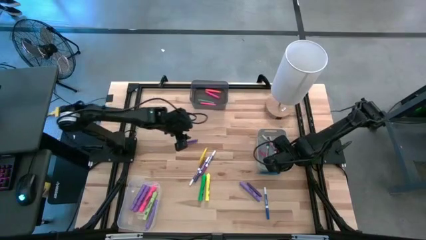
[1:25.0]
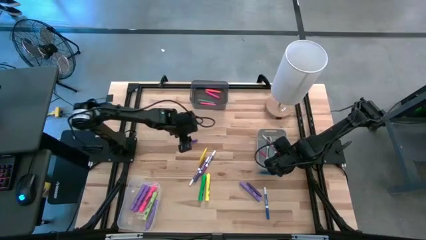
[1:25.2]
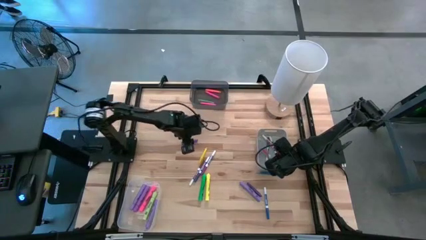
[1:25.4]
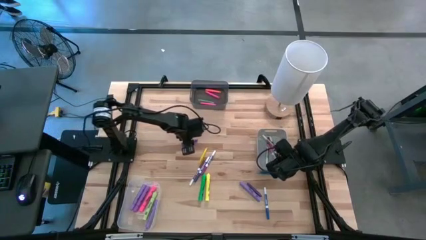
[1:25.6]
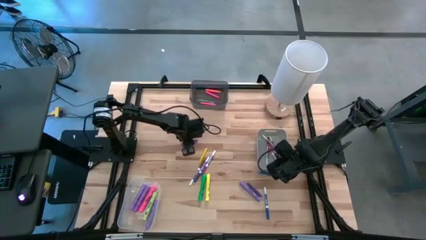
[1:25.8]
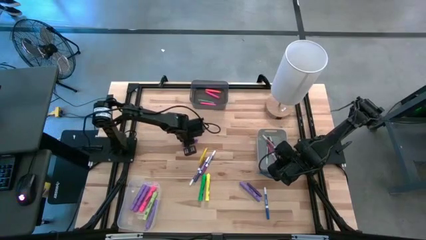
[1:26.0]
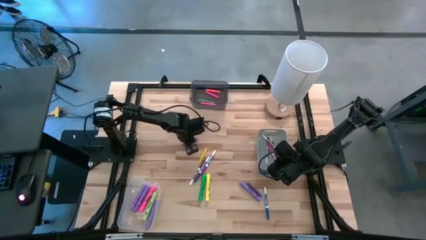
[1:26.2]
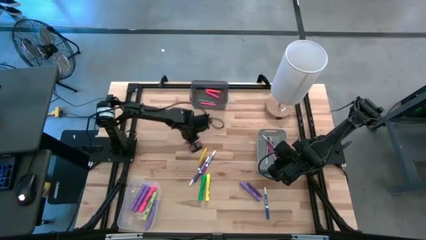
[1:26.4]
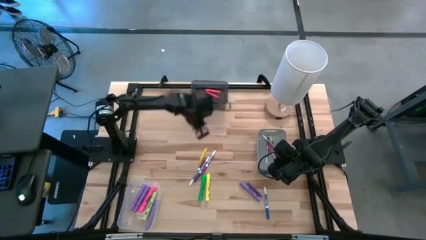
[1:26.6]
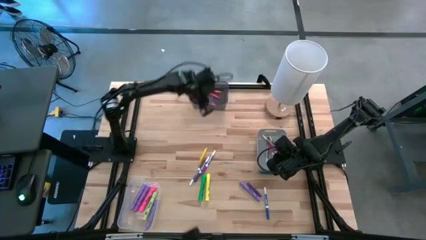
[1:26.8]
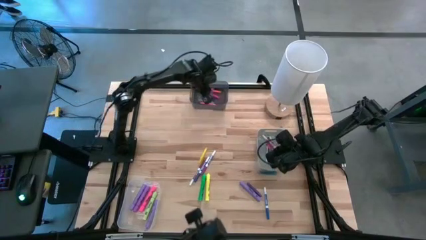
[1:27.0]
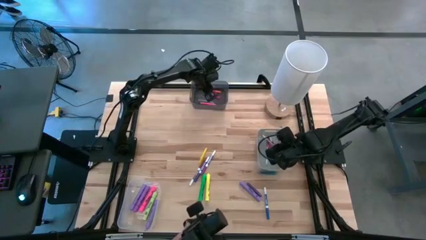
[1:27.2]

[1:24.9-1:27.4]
Task: Pick & Place Markers
Put the top purple pen into the black bin

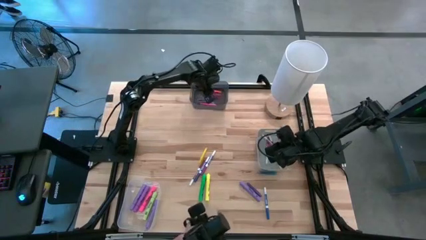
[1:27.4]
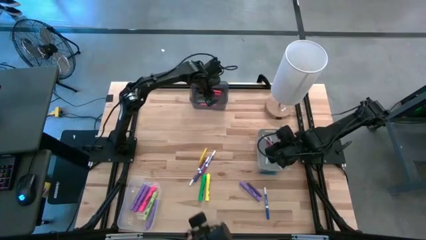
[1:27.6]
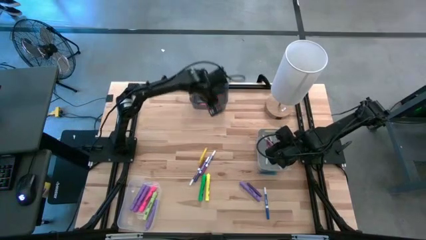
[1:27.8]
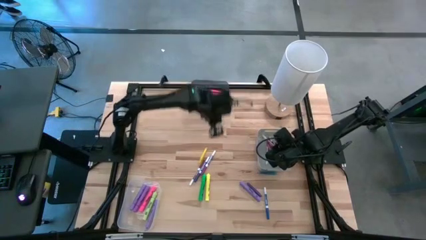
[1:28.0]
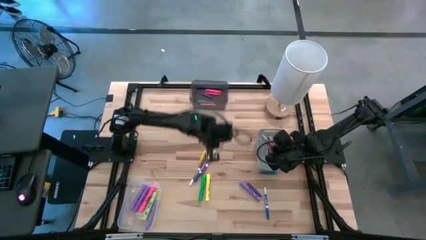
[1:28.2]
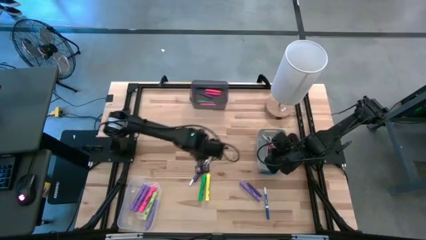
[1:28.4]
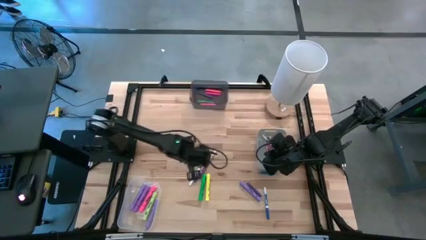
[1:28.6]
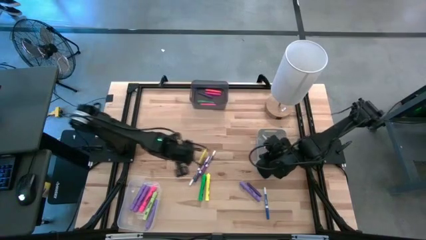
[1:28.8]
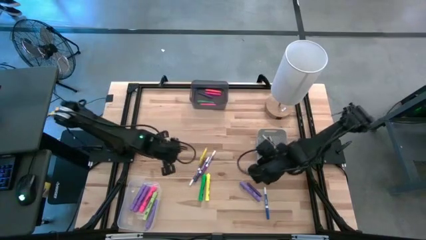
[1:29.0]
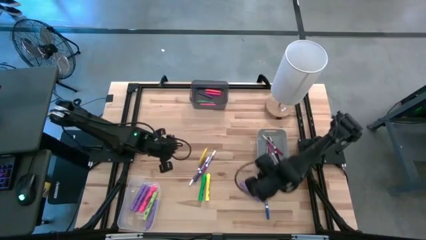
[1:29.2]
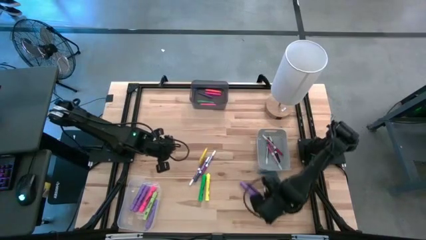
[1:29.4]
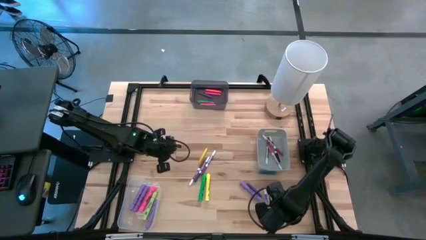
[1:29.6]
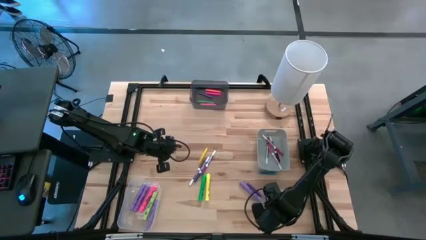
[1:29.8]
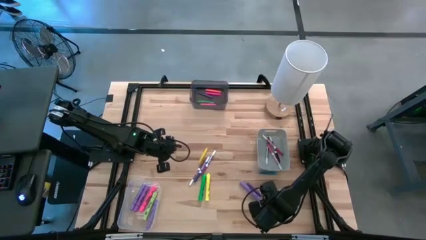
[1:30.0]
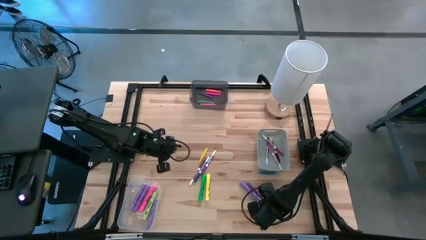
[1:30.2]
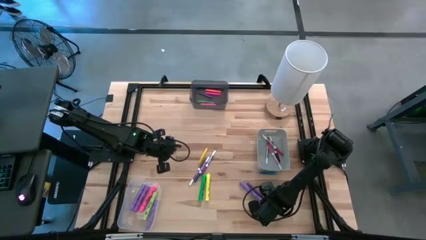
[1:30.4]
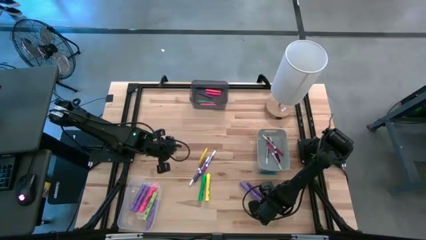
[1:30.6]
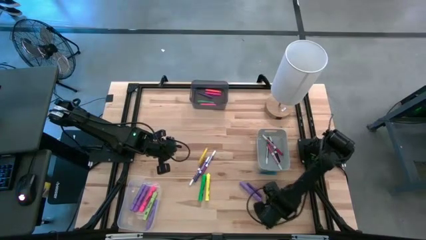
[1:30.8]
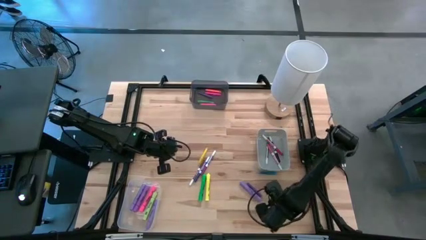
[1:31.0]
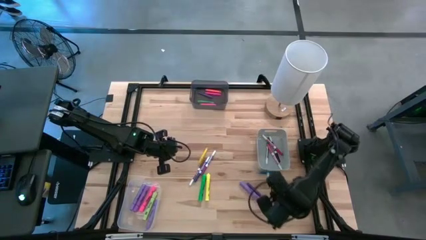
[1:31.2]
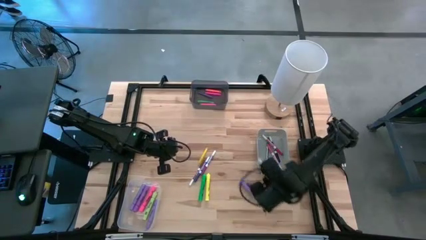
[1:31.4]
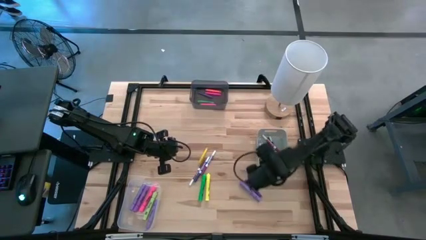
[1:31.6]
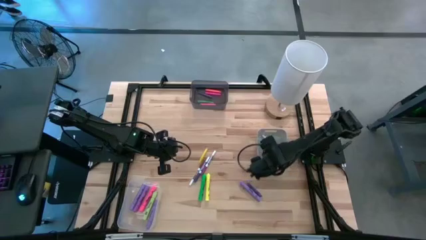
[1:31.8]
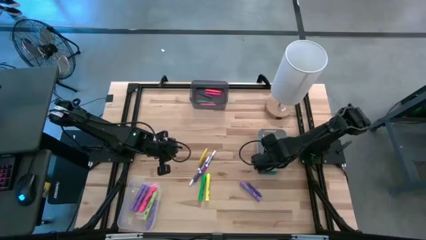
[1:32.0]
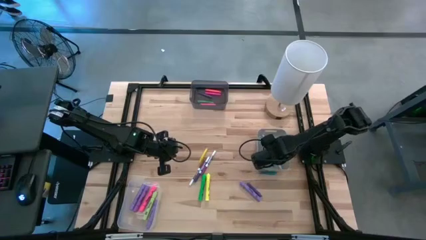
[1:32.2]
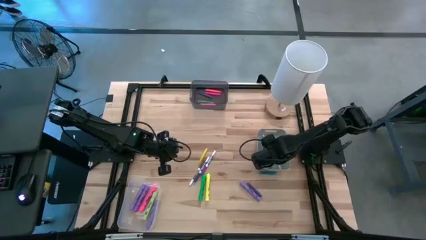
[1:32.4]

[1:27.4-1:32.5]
Put the right blue marker pen into the gray bin

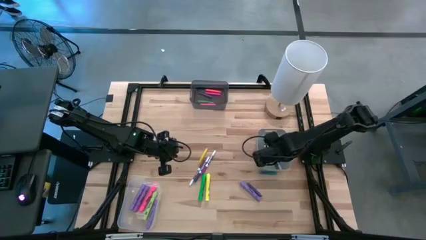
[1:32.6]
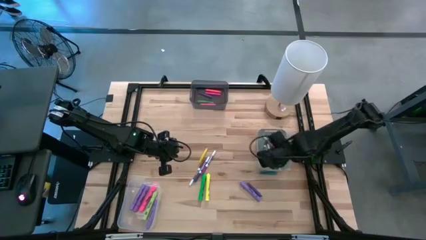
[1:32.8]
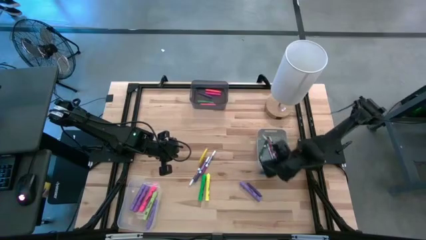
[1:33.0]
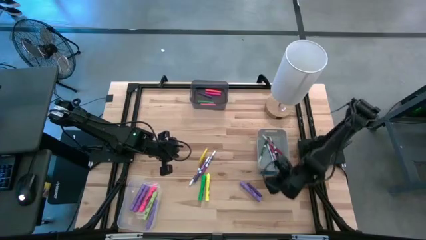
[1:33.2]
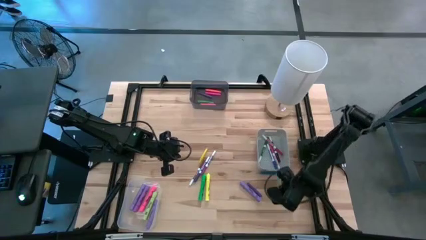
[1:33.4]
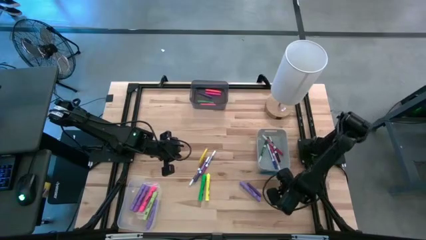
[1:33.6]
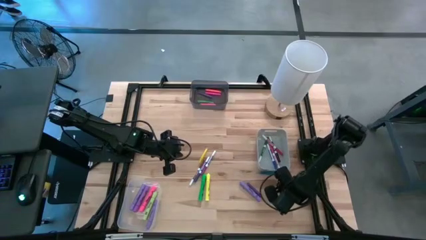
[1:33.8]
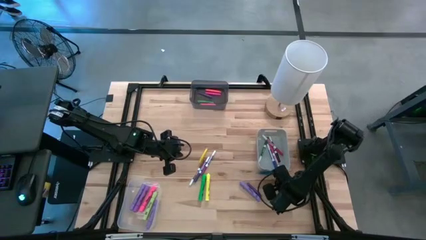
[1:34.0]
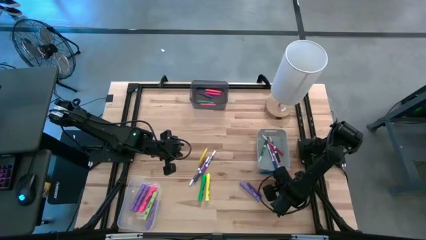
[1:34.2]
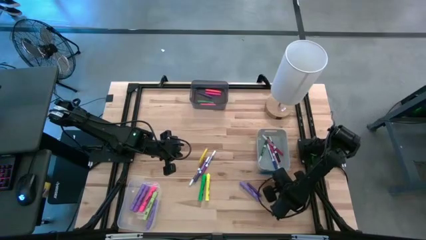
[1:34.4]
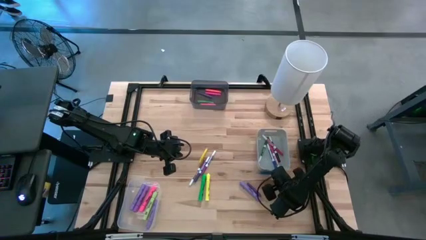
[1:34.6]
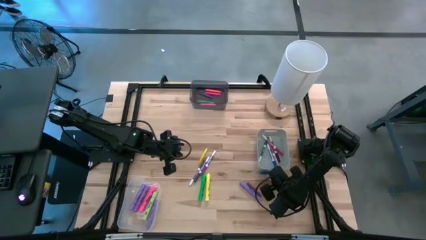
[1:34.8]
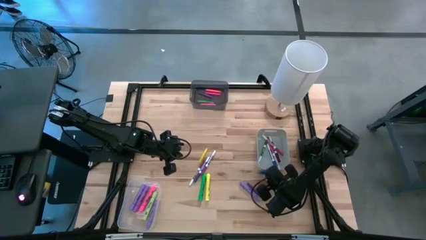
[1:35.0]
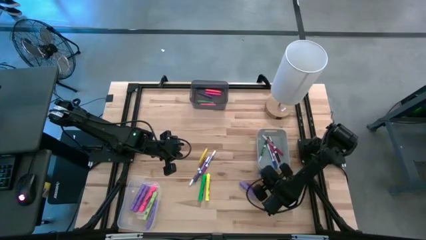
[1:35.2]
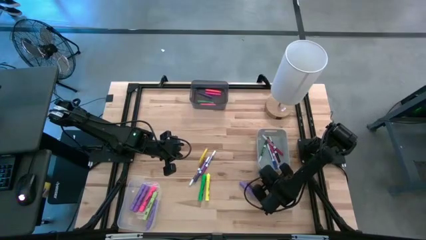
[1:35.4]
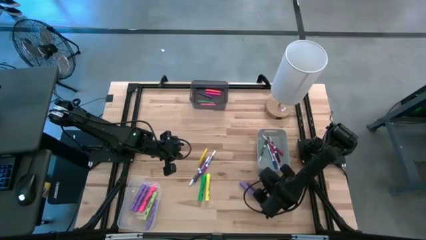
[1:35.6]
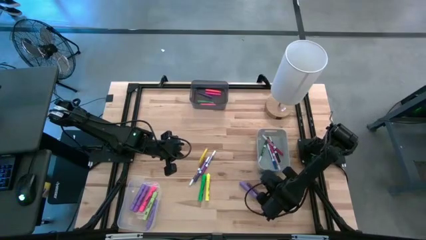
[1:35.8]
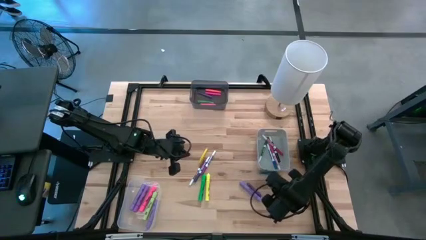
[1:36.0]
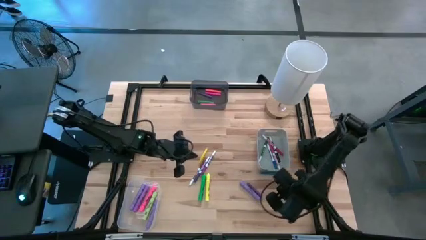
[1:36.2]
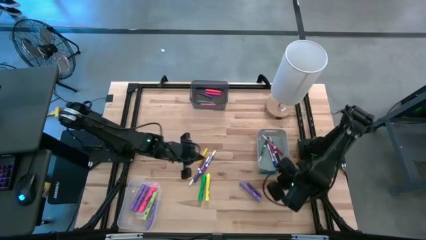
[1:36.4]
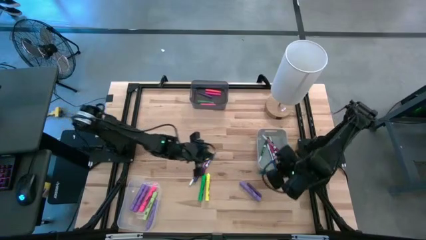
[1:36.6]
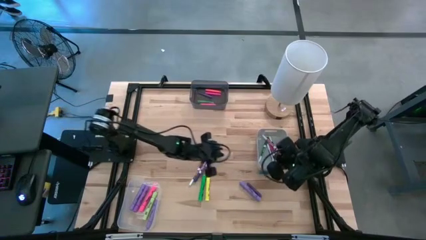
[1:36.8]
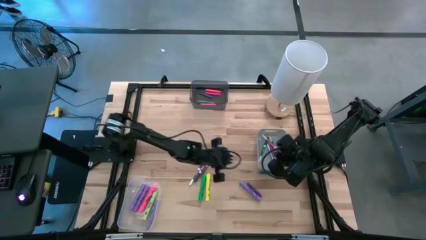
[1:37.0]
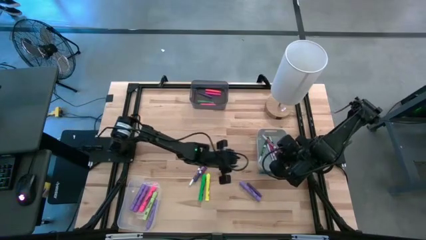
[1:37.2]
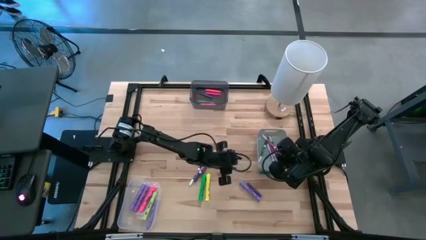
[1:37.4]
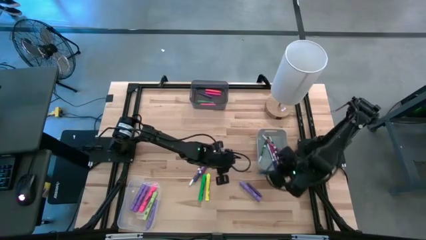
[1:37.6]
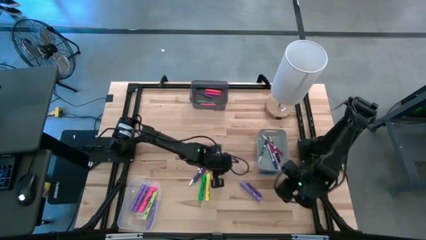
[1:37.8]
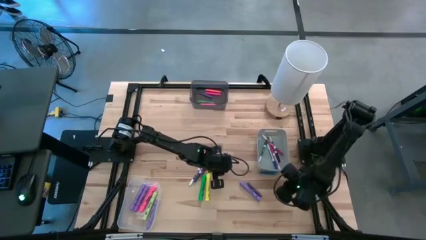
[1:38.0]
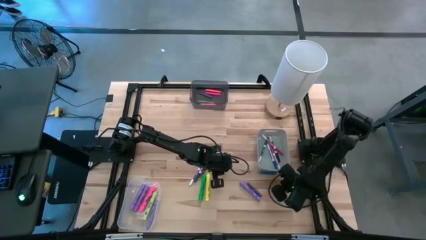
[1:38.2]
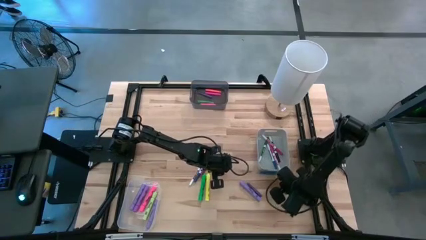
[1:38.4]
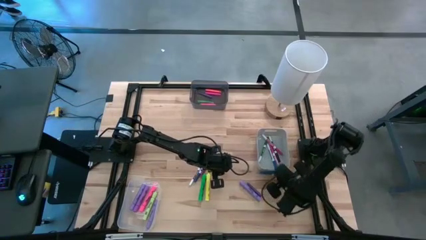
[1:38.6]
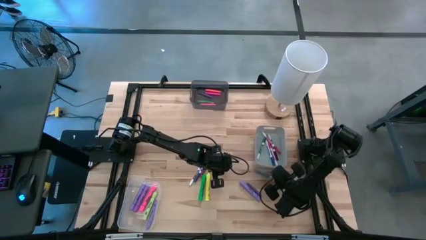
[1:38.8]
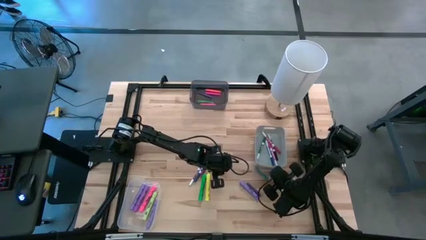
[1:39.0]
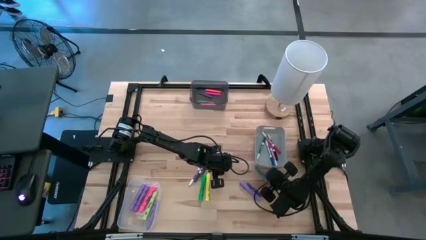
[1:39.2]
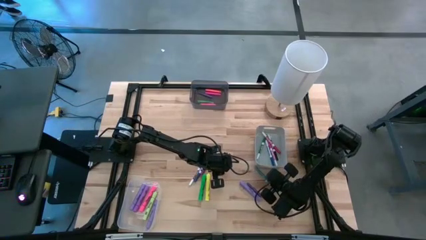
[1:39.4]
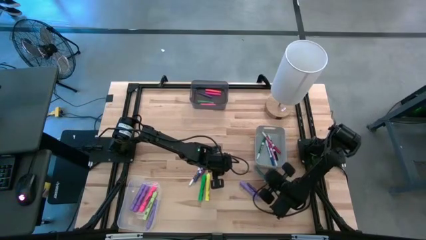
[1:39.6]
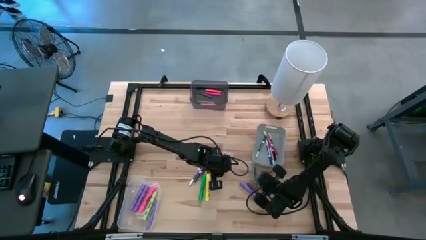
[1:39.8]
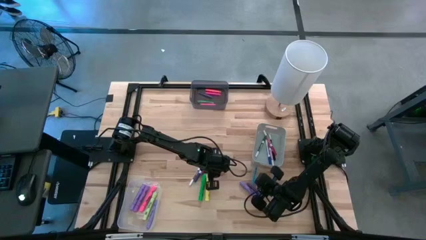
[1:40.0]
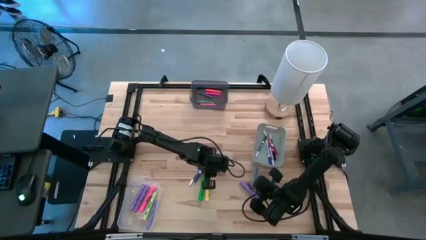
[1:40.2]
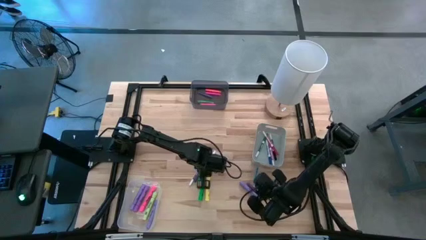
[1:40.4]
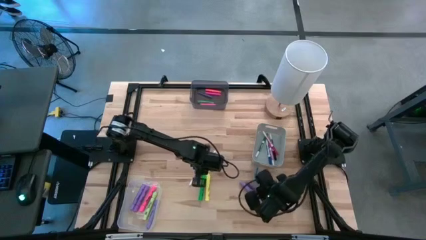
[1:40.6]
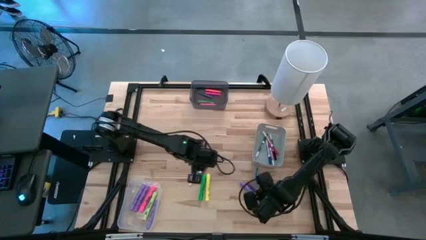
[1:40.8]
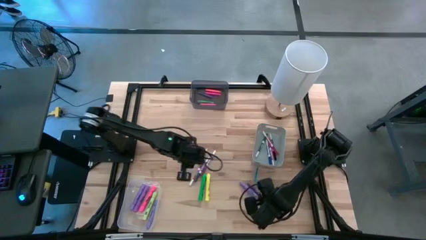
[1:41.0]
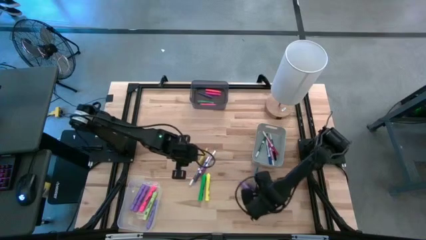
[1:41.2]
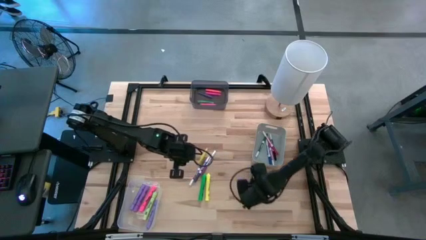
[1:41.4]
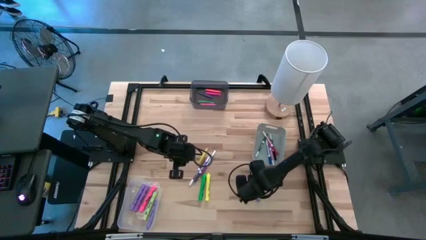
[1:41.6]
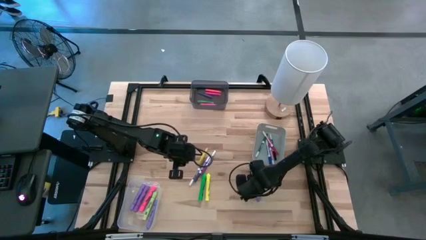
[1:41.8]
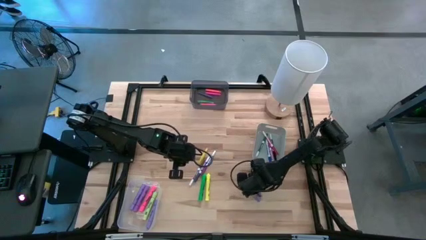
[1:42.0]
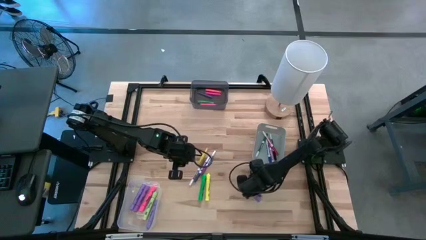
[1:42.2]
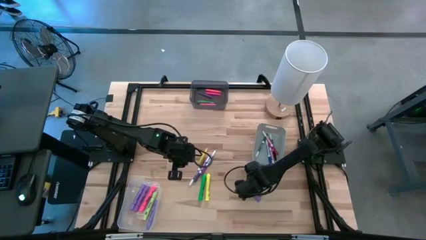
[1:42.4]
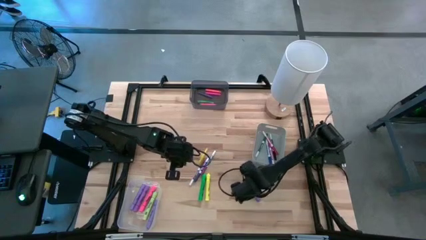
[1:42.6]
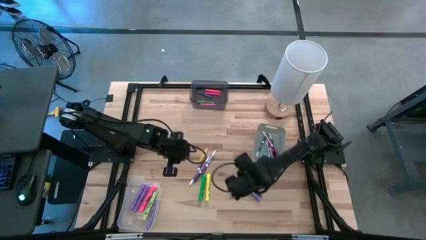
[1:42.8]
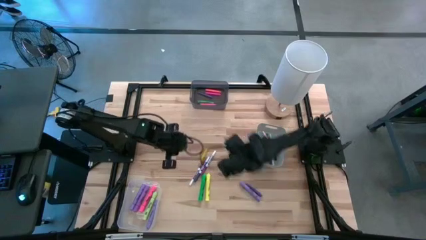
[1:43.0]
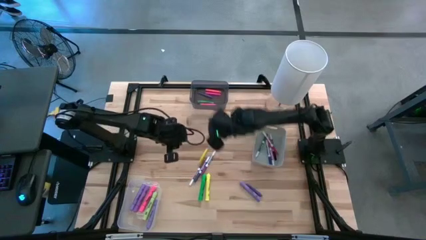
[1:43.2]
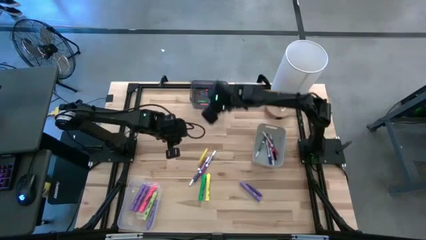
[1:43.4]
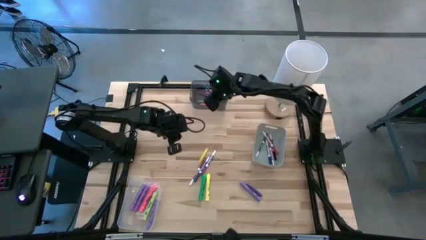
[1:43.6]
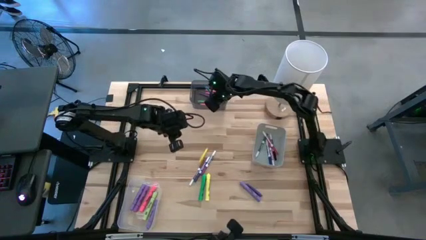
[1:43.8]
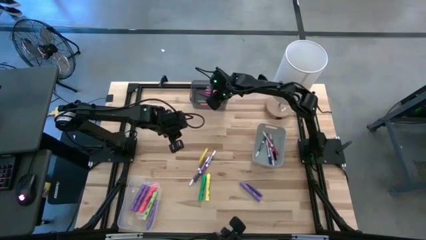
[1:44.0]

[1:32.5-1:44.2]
Put the blue pen into the black bin
